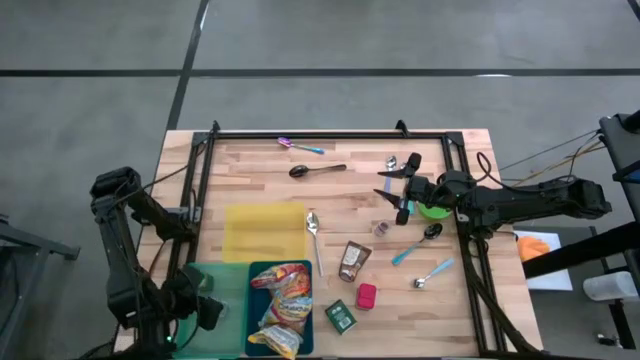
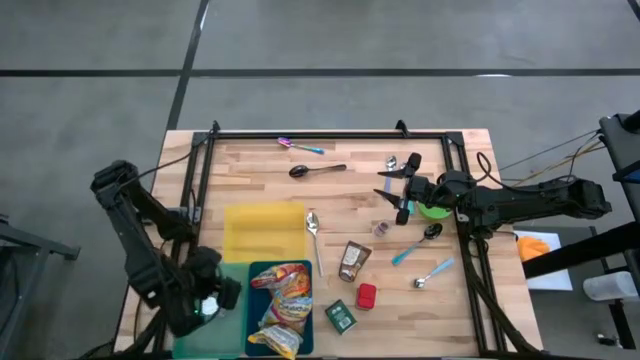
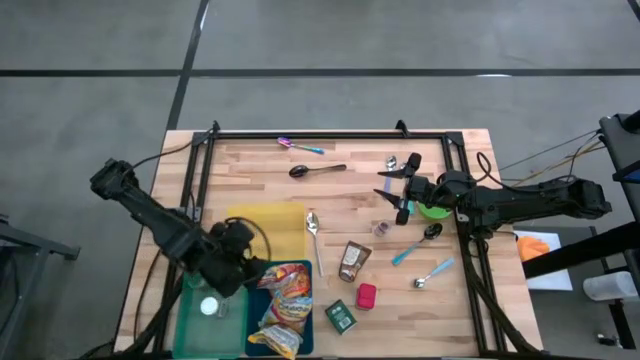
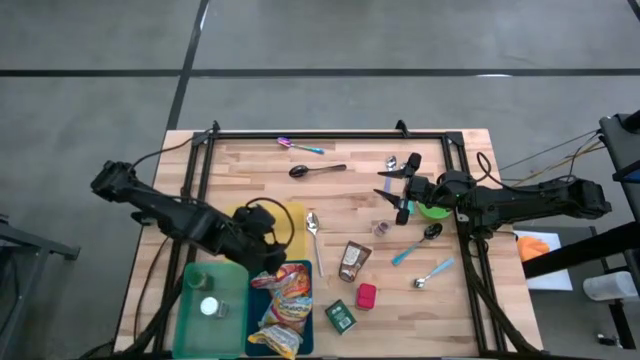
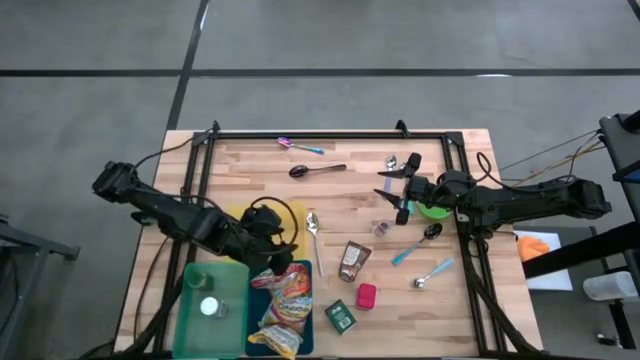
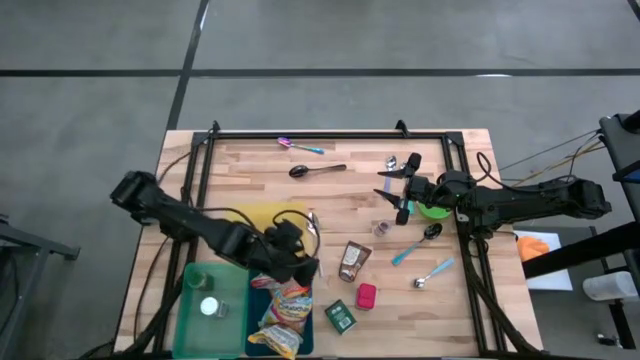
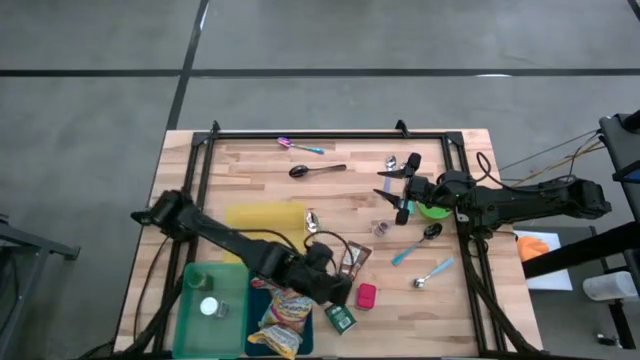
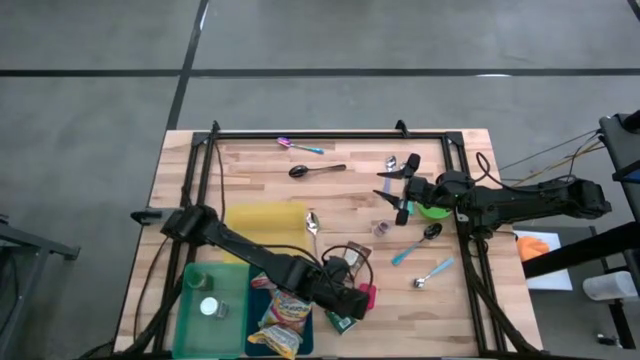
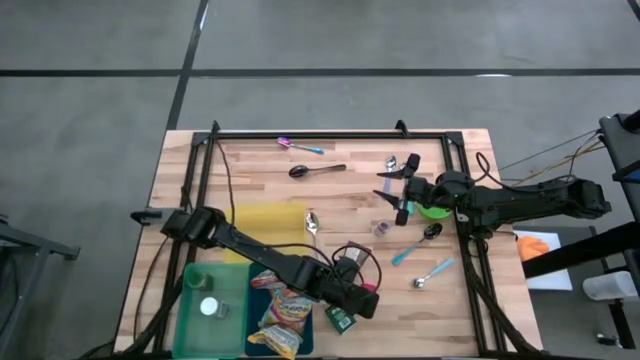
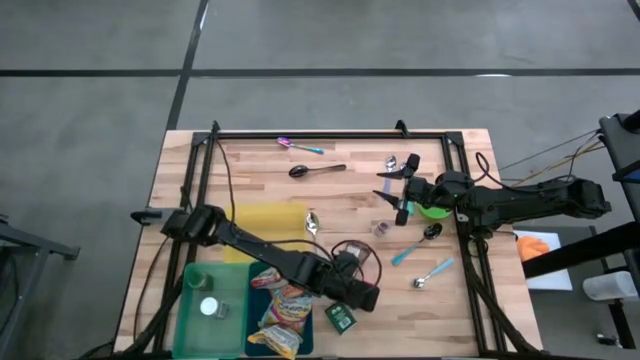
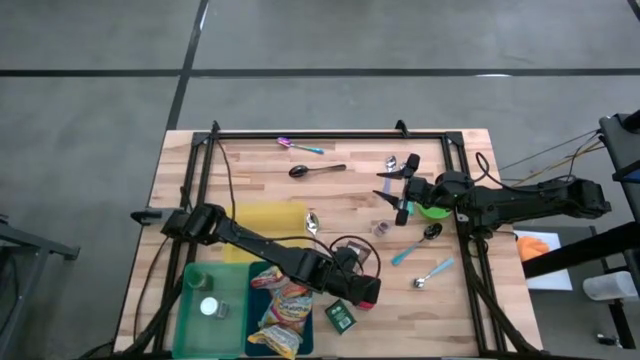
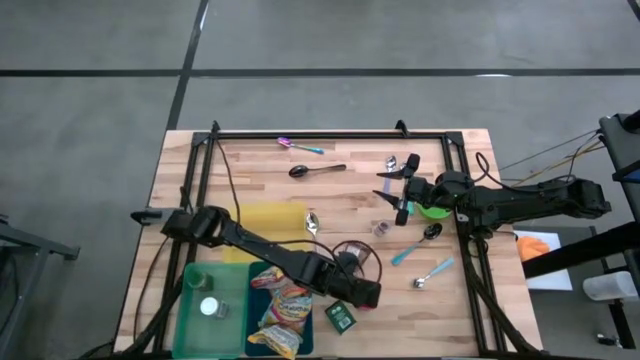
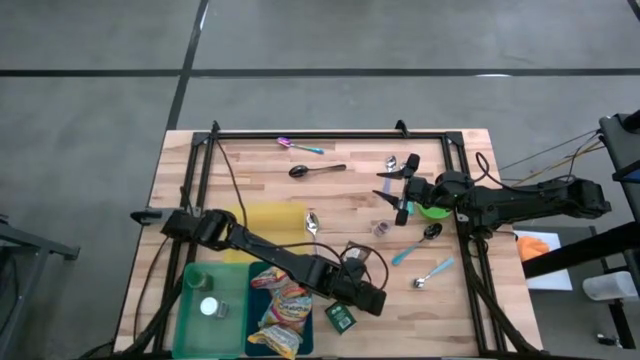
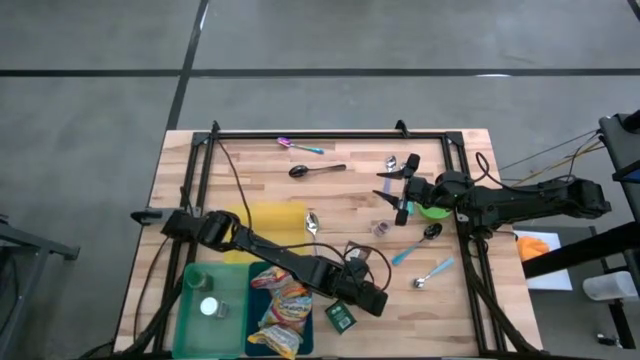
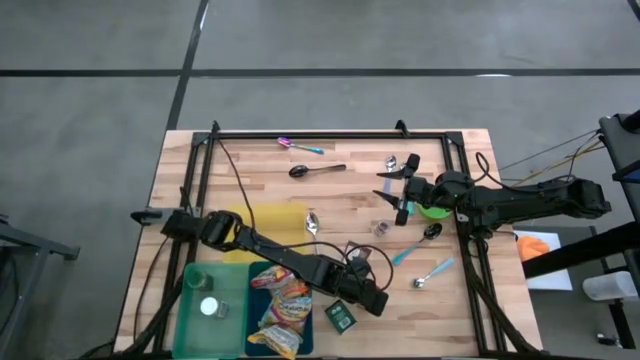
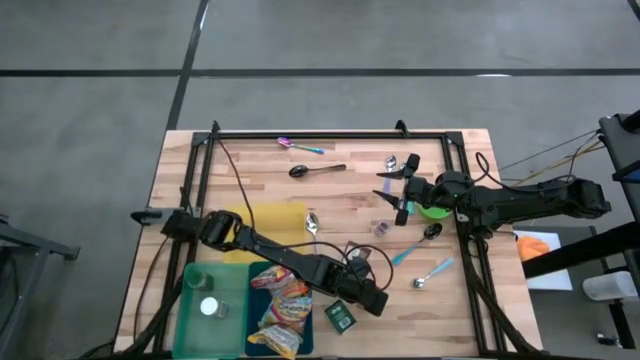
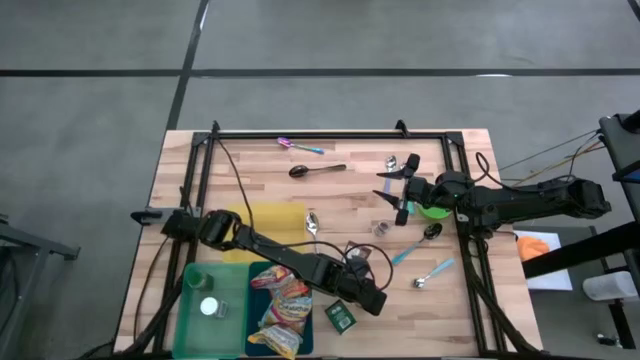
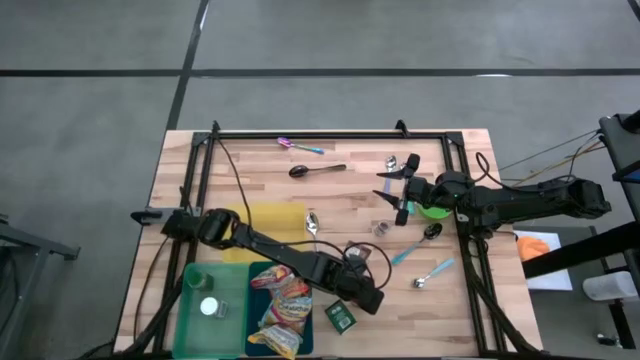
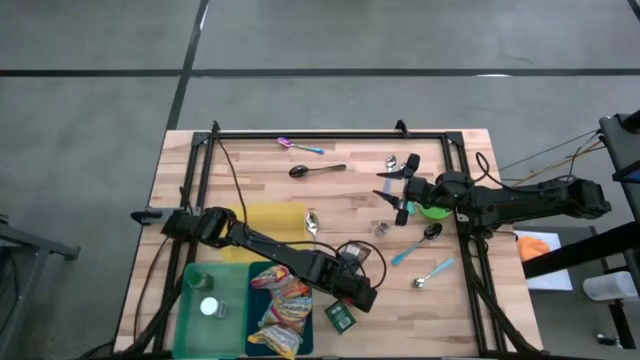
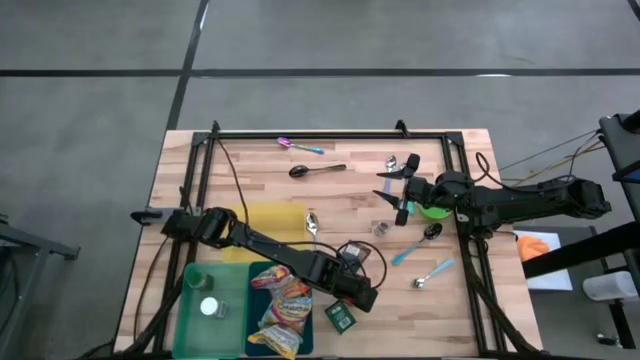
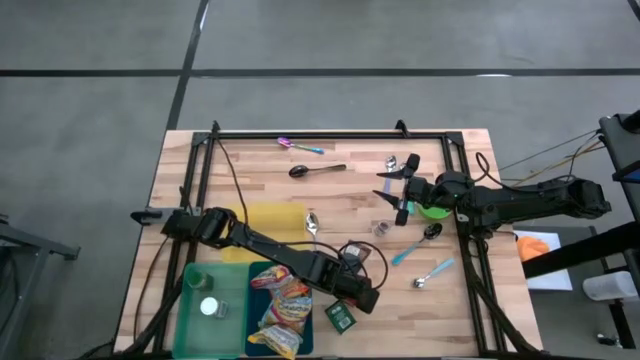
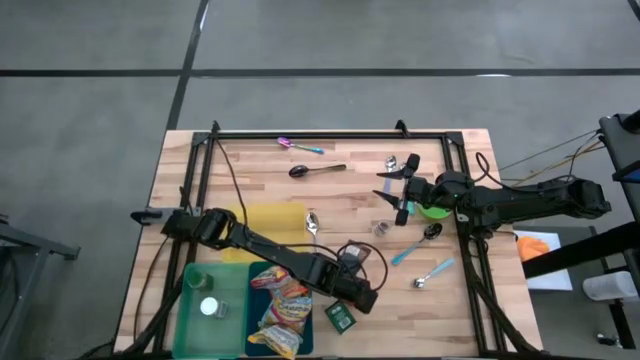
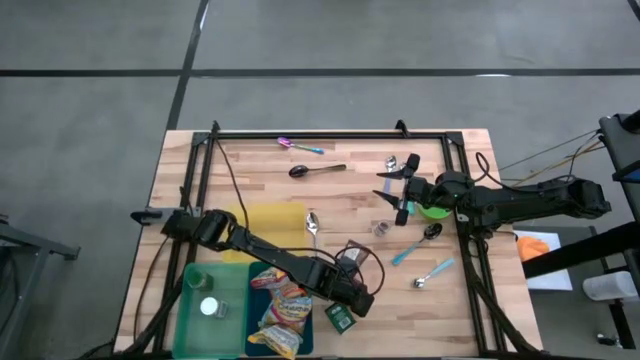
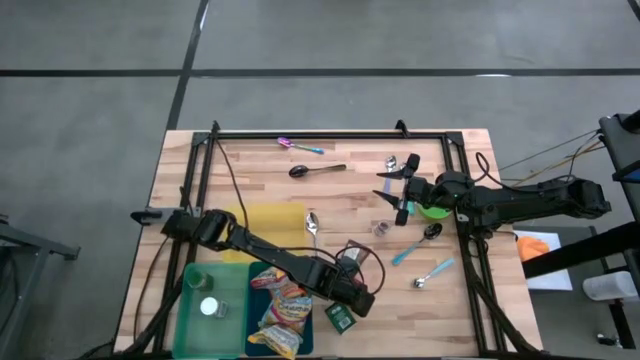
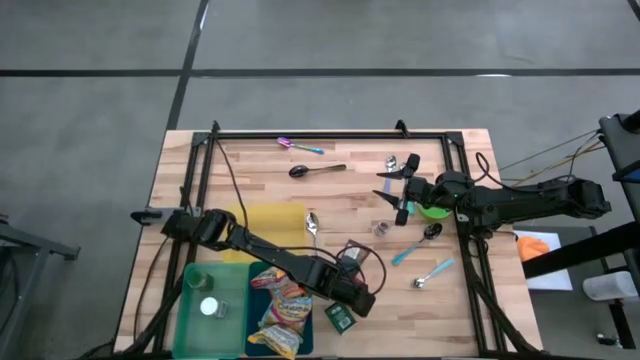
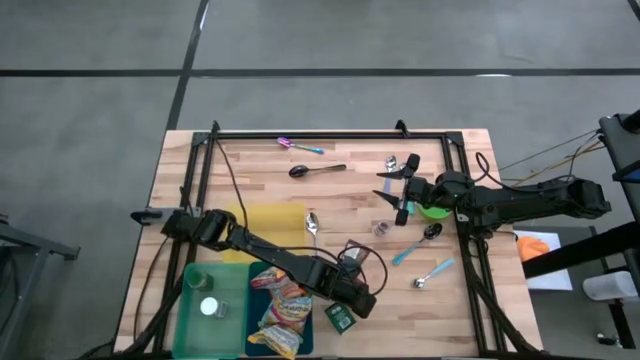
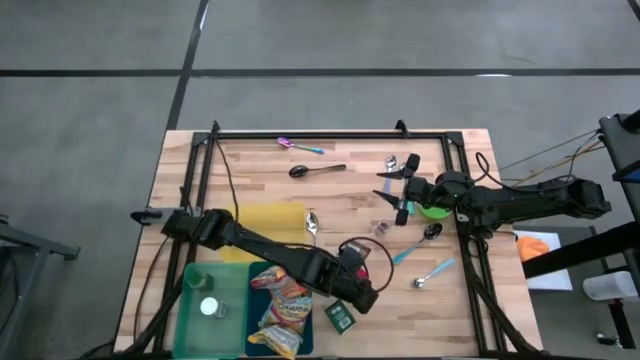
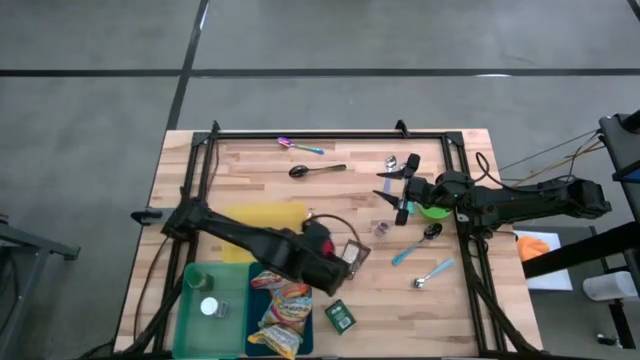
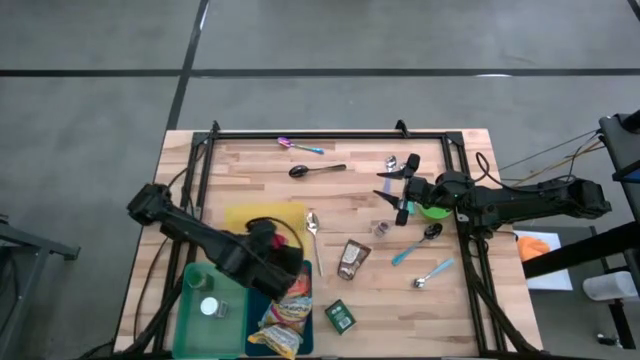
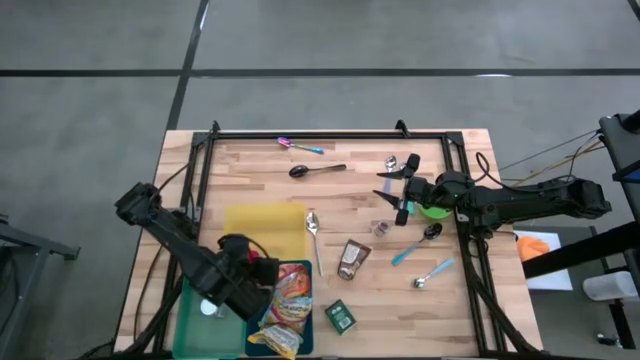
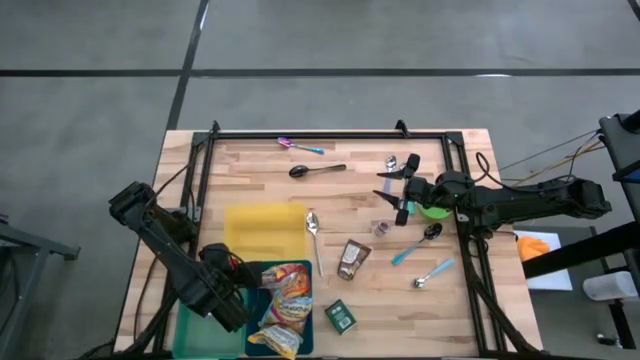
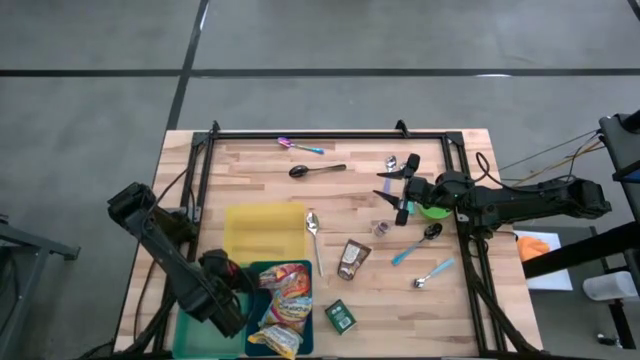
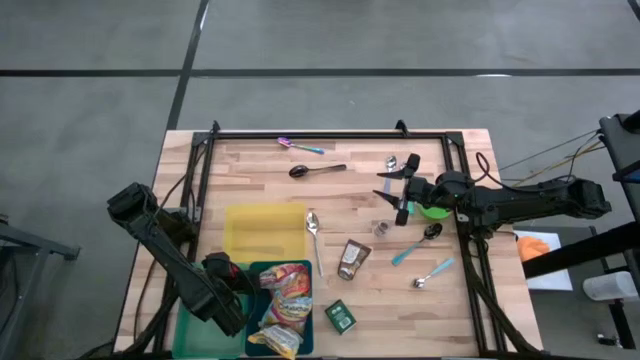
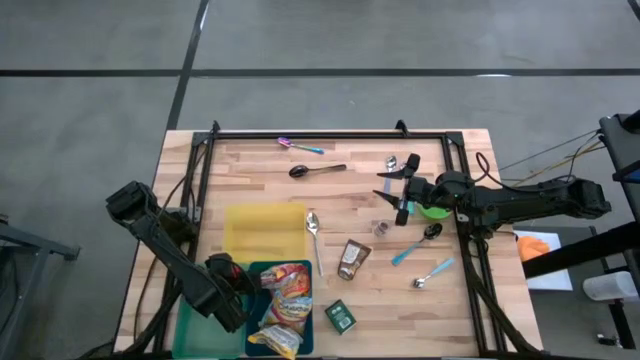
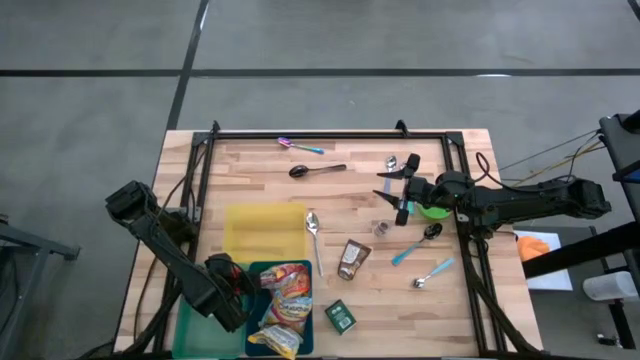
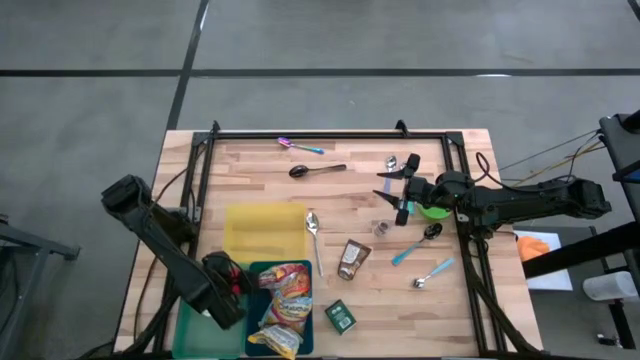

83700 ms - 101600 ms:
Put the red spice can into the green bin

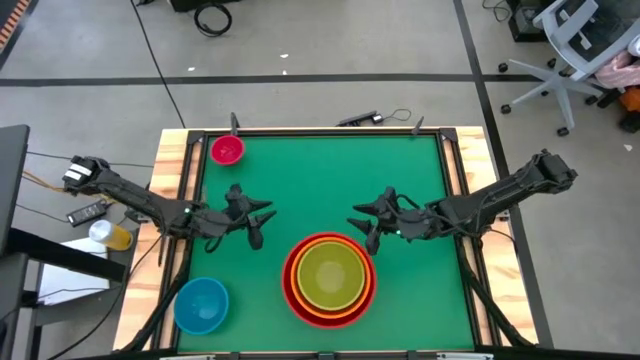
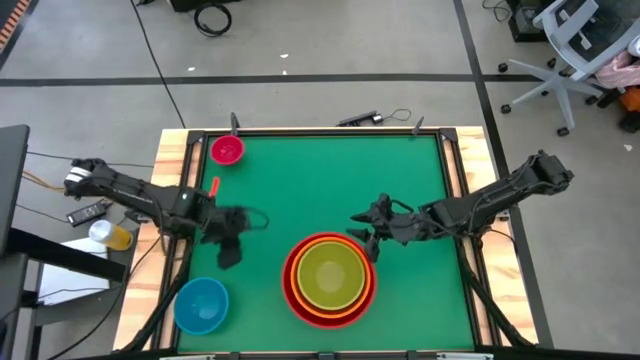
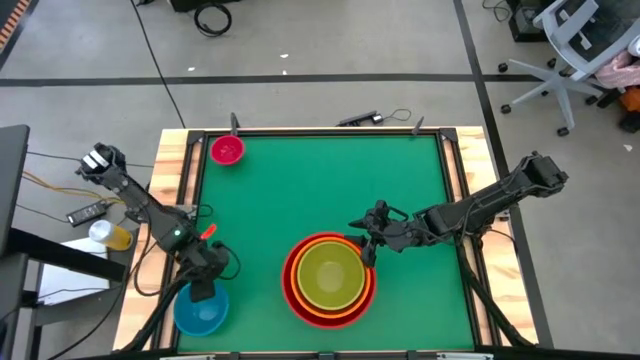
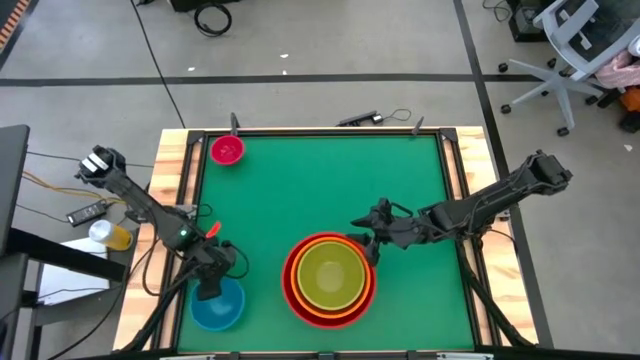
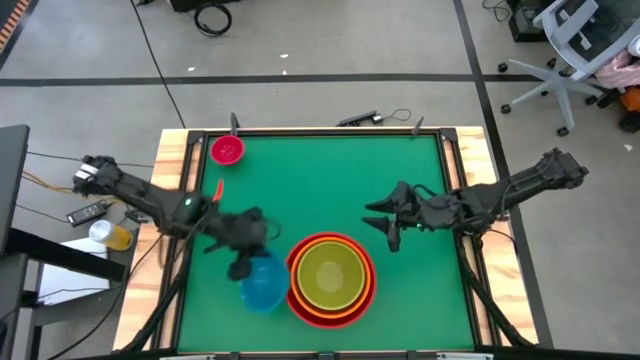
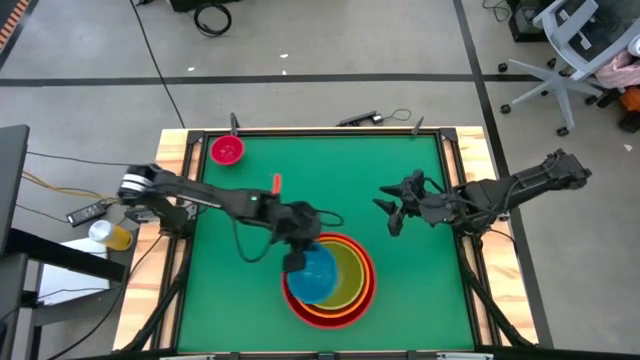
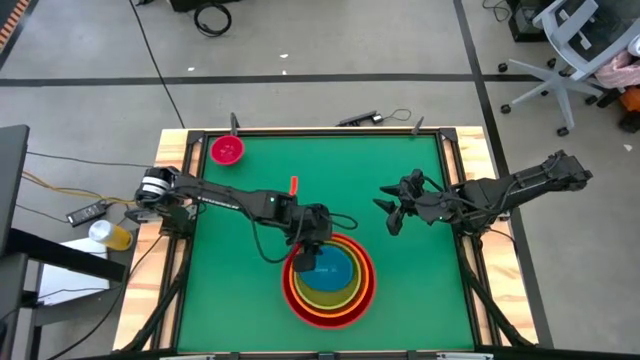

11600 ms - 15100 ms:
Stack the blue bowl into the green bowl

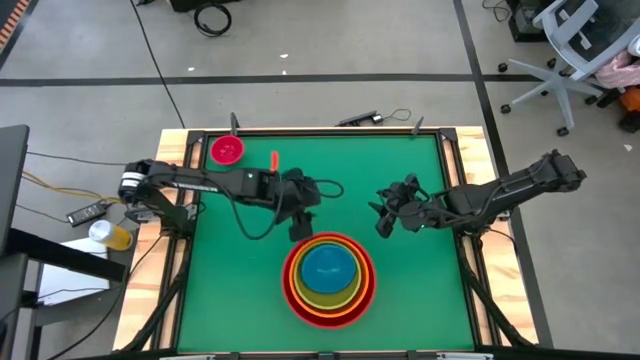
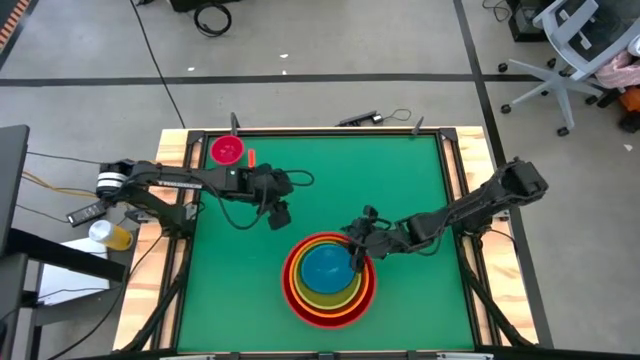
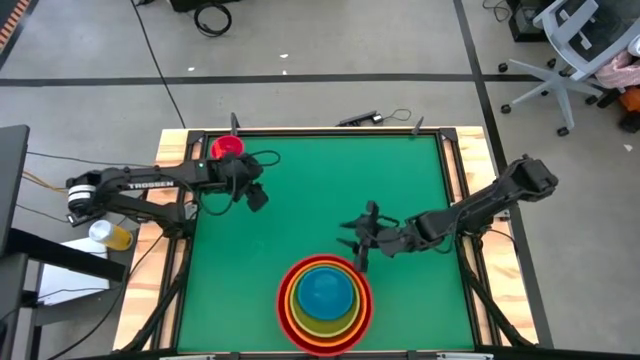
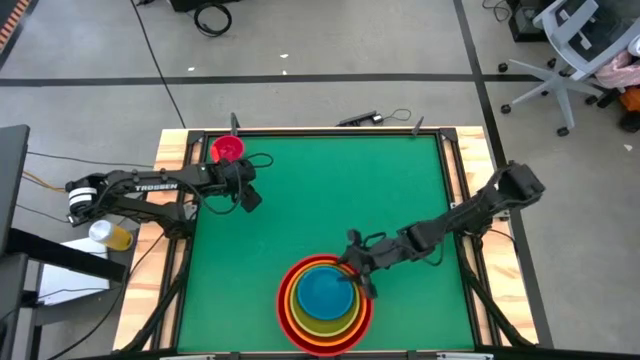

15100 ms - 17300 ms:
Adjust the stacked colored bowls
